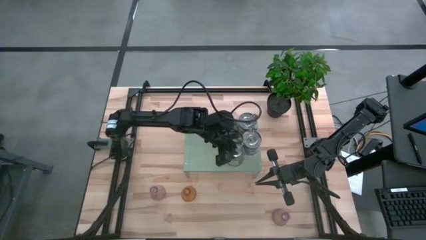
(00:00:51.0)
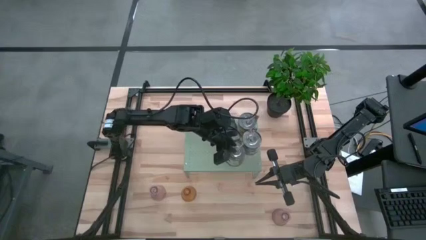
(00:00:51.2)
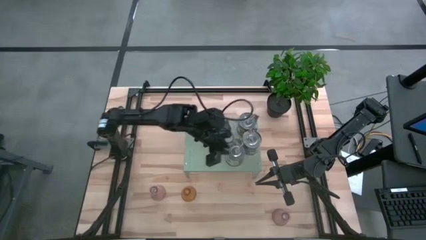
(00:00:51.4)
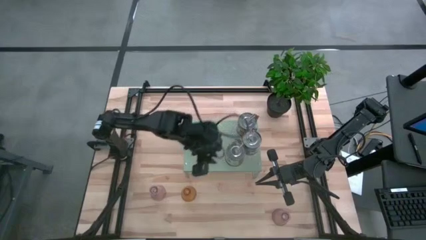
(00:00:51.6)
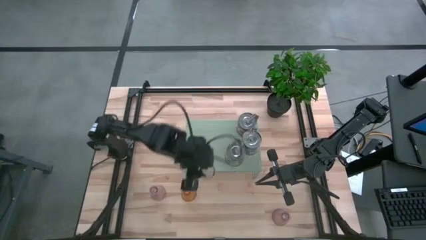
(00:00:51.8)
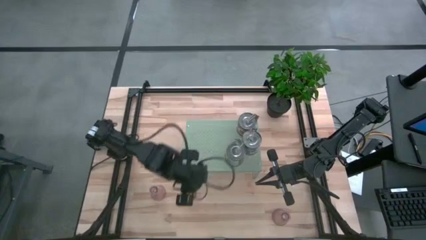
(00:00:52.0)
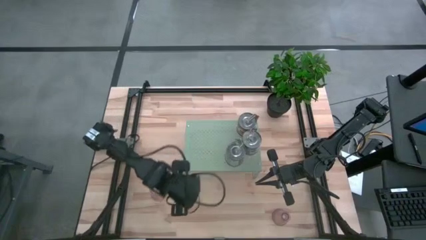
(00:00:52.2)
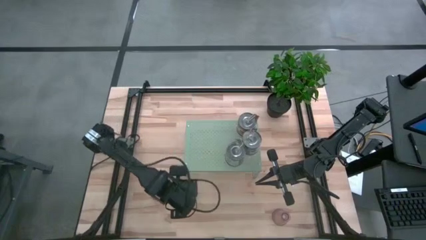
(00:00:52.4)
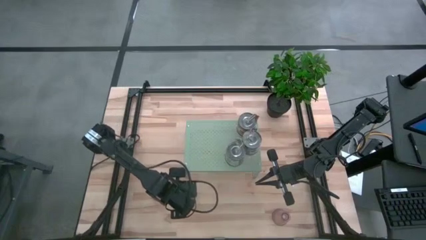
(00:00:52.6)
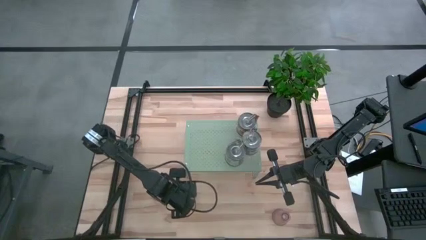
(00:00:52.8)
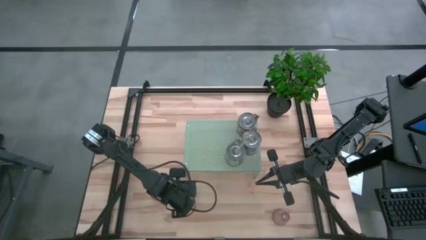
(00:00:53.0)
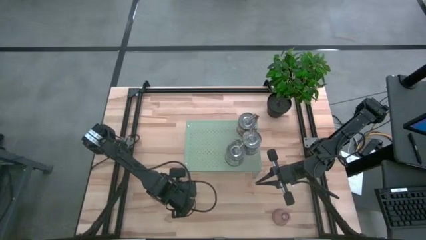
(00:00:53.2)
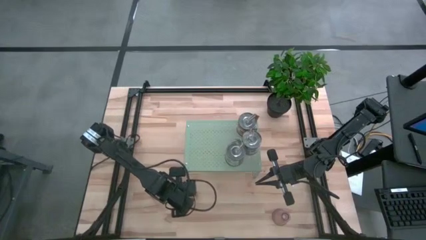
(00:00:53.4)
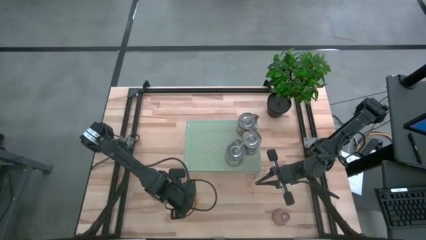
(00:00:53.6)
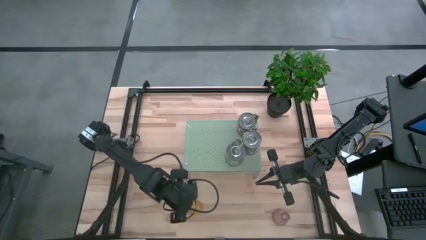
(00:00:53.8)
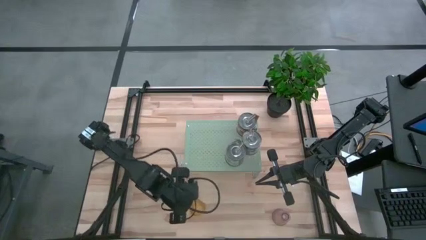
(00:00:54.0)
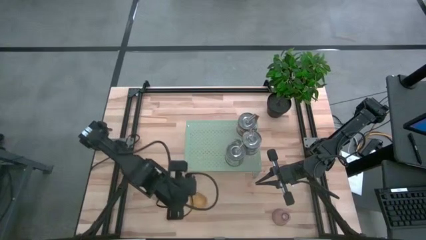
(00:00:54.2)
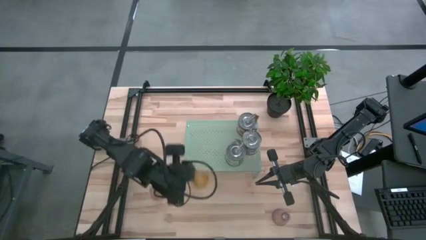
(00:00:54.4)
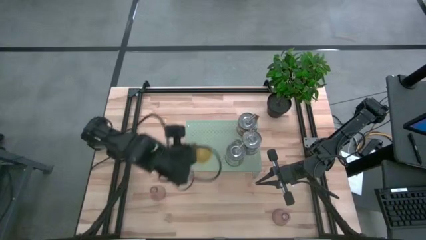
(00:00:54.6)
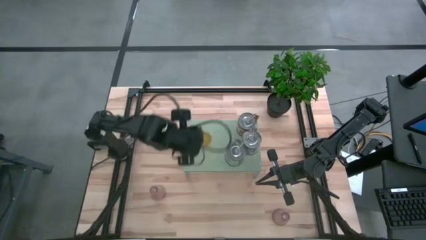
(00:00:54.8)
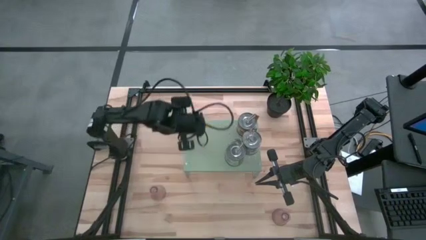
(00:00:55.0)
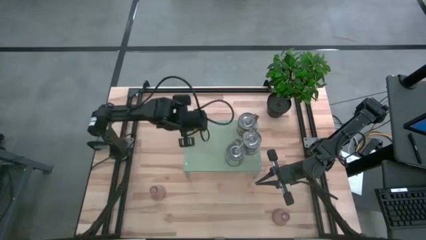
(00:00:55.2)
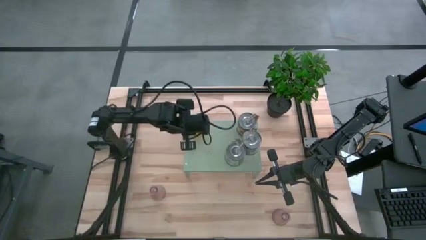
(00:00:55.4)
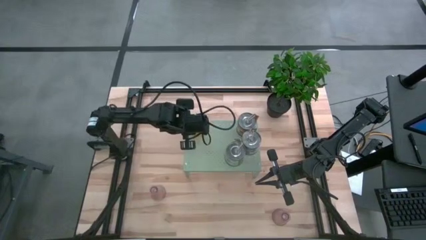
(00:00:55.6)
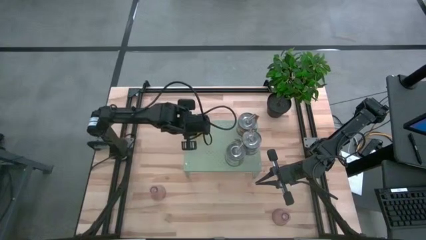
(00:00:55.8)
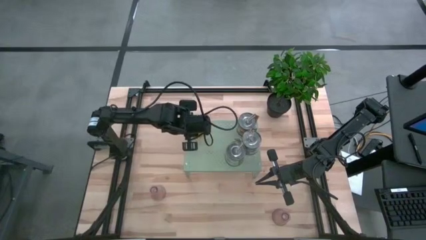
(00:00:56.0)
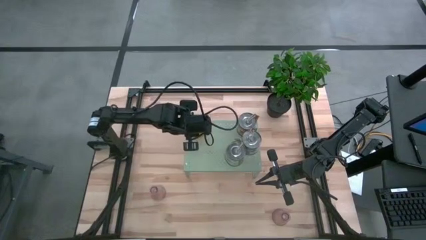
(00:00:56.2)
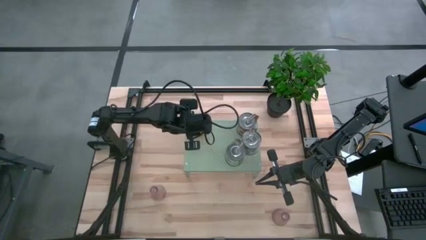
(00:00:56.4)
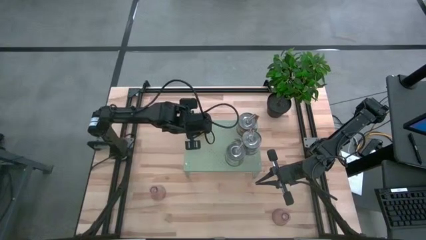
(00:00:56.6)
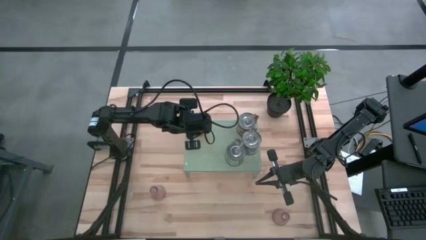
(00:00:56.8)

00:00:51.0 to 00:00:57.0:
Task: Pick & Place candle stick holders
Put the yellow candle holder on the shelf

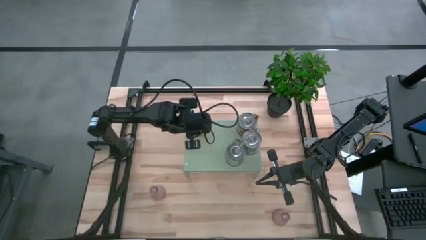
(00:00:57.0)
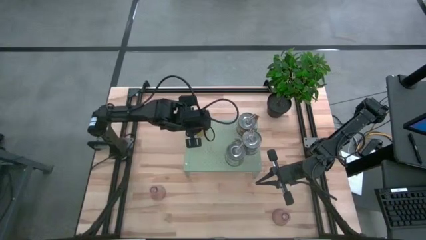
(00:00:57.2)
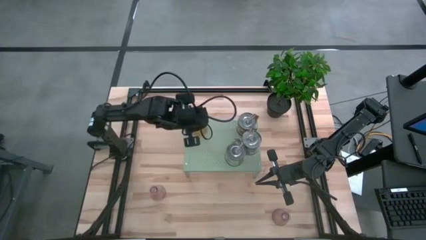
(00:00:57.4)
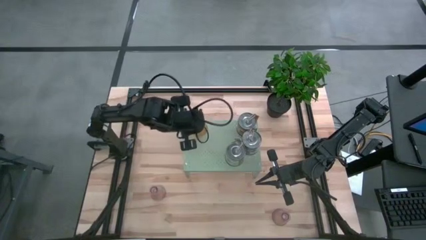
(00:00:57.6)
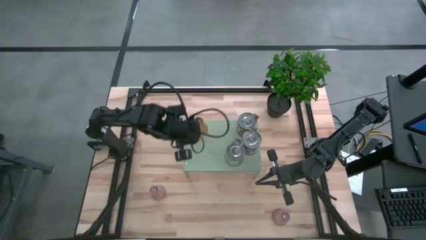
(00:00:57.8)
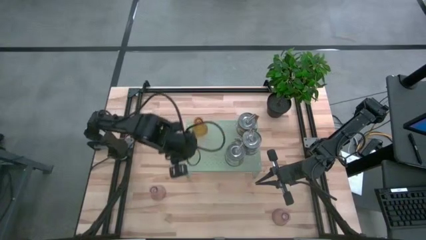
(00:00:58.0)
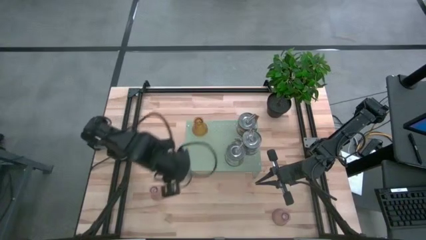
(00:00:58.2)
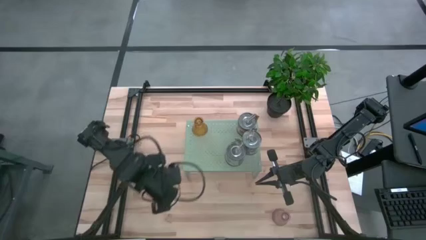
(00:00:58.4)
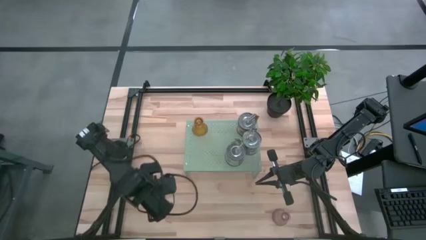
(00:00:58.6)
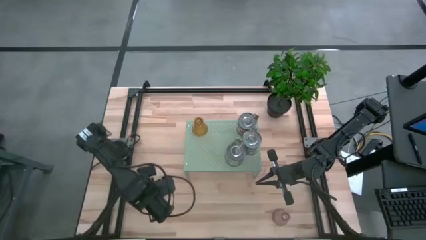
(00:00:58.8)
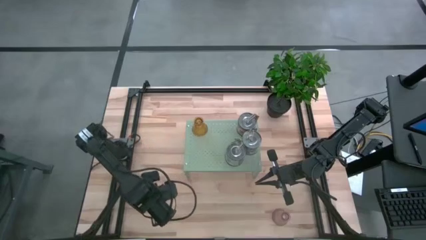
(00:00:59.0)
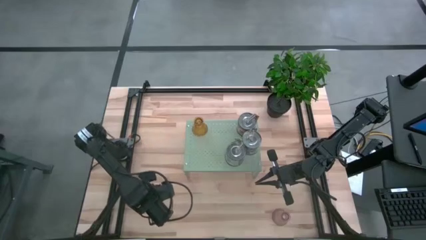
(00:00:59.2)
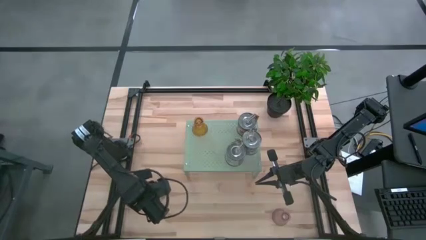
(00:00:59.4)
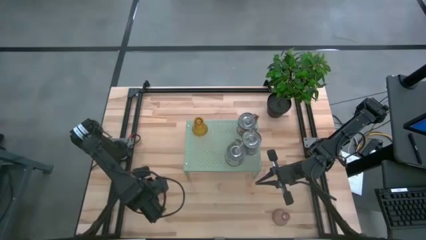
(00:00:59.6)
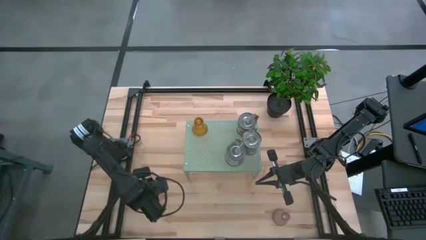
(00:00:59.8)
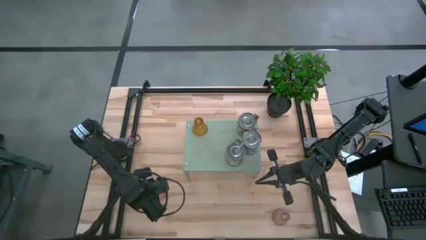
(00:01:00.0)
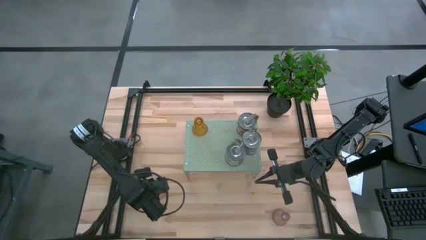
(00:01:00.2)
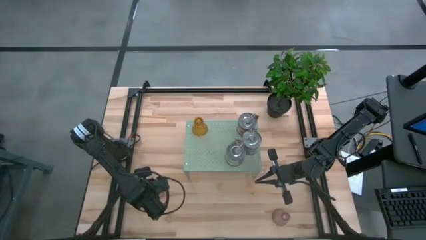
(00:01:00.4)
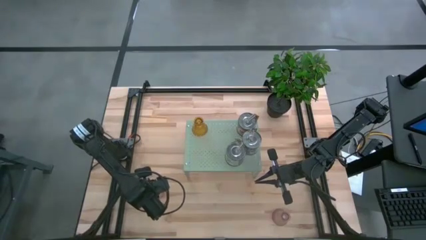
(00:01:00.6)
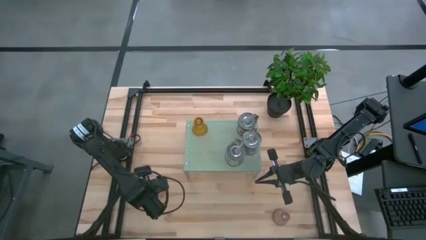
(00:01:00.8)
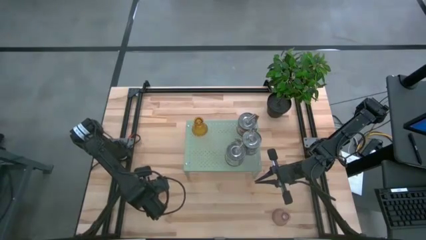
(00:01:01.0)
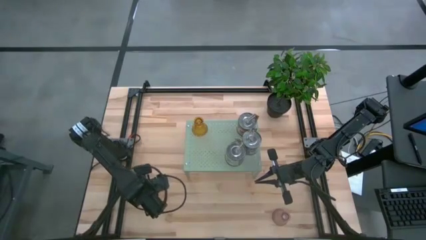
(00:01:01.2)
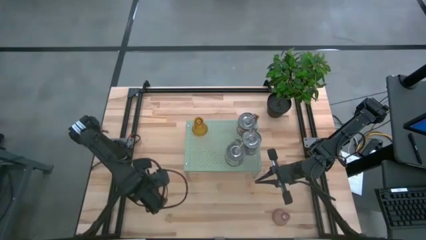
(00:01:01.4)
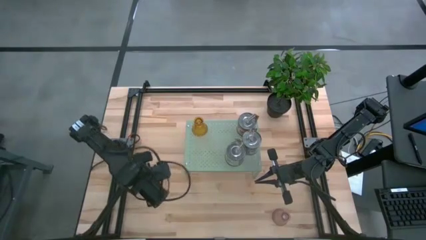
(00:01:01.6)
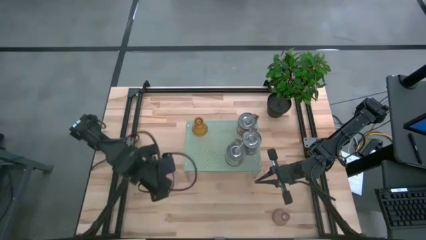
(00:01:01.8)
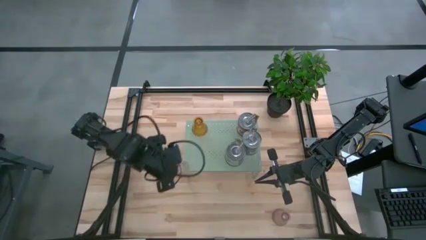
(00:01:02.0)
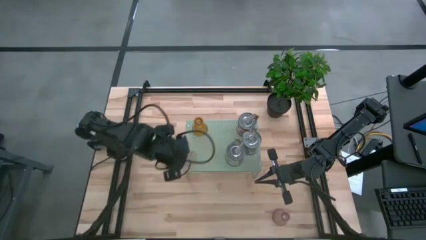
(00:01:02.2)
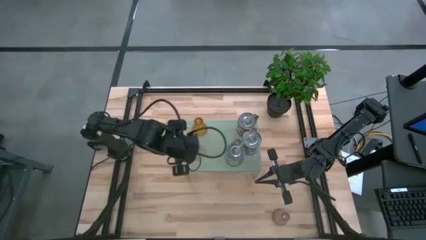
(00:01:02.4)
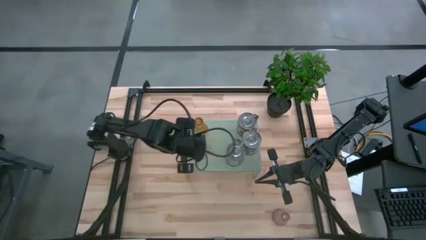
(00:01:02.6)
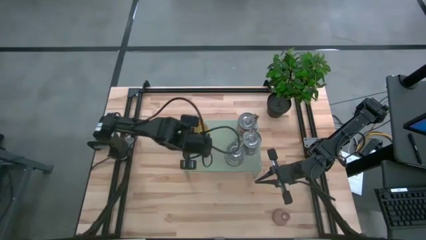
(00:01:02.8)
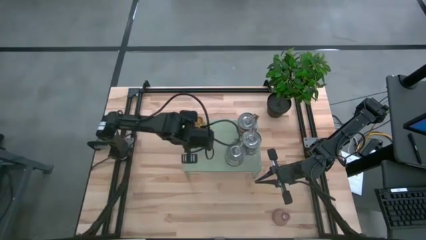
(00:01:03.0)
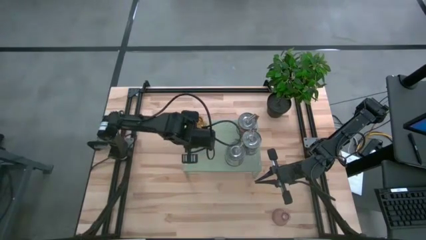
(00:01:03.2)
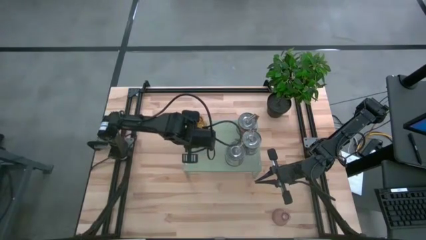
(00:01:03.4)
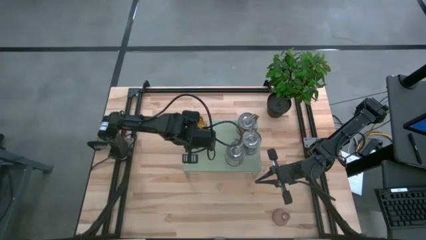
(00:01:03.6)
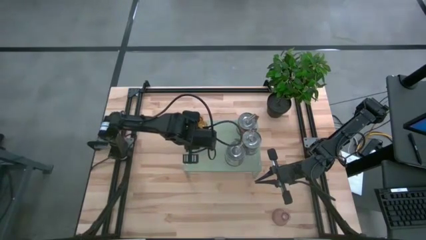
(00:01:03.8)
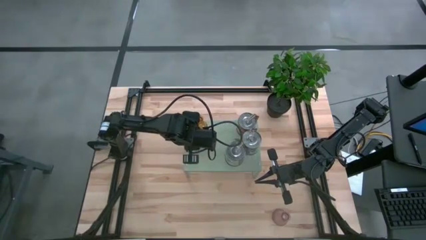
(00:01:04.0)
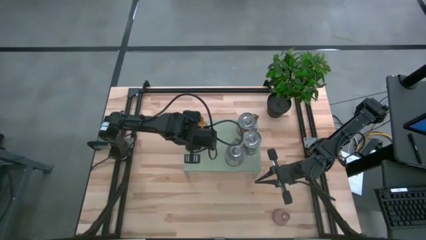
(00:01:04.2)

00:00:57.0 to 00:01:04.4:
Put the left pink candle holder on the shelf
